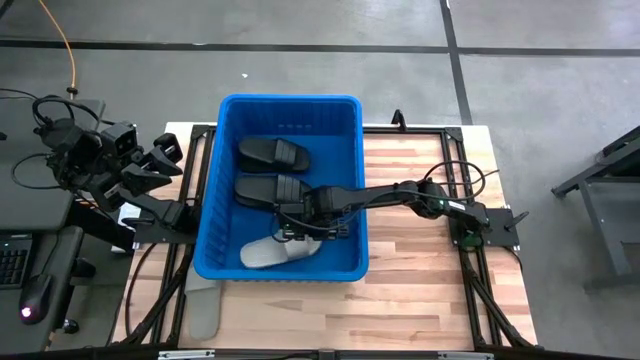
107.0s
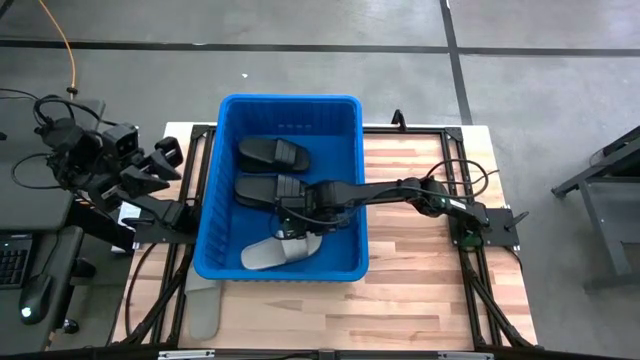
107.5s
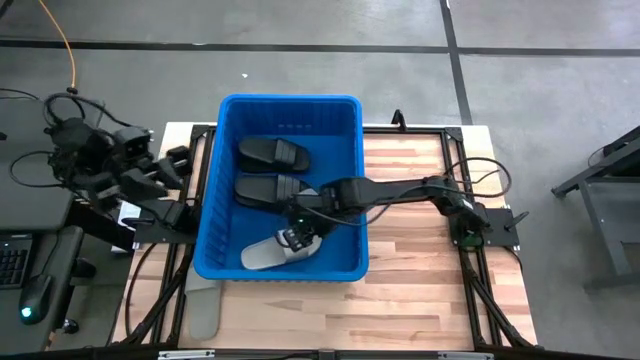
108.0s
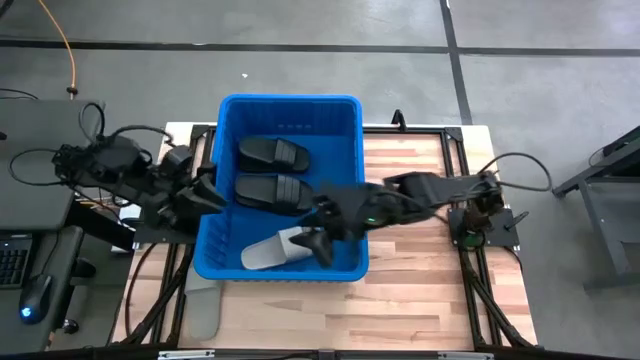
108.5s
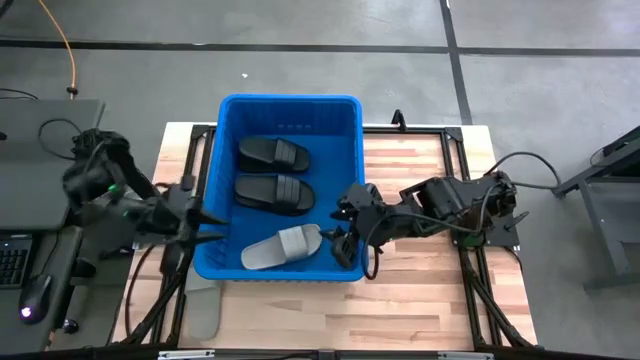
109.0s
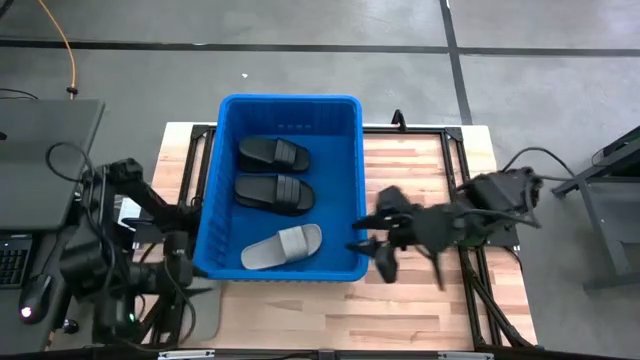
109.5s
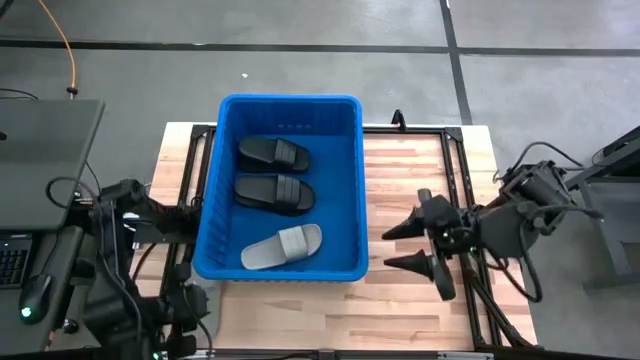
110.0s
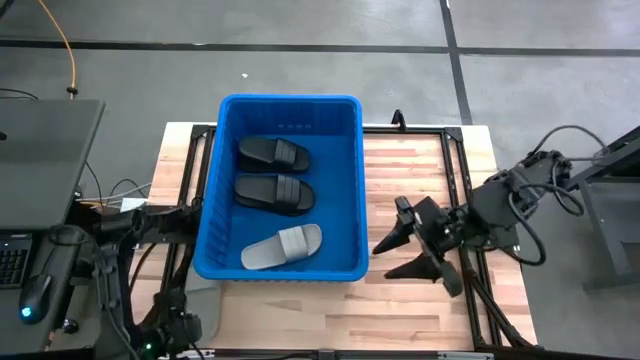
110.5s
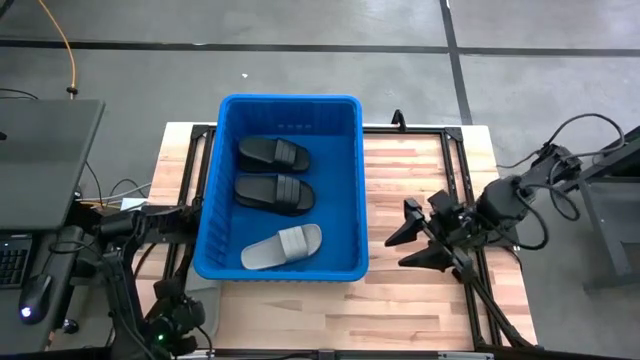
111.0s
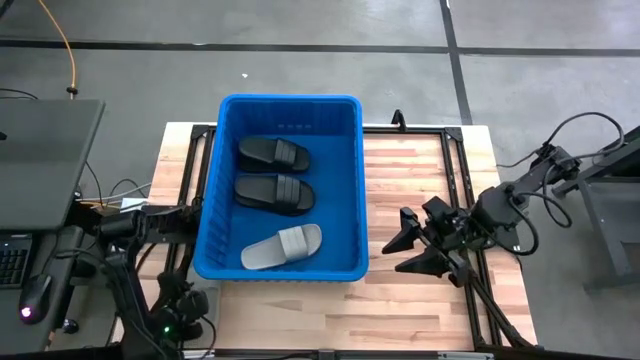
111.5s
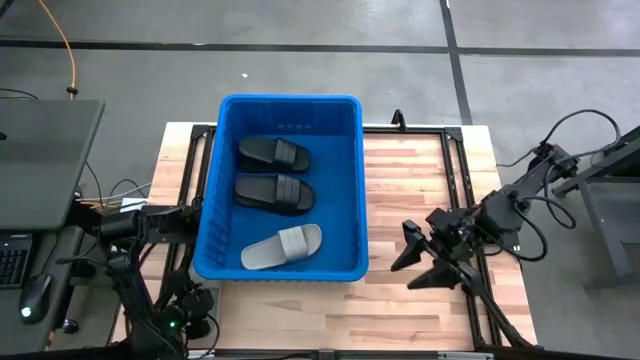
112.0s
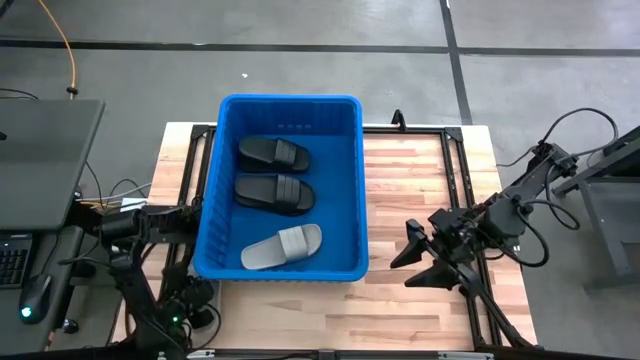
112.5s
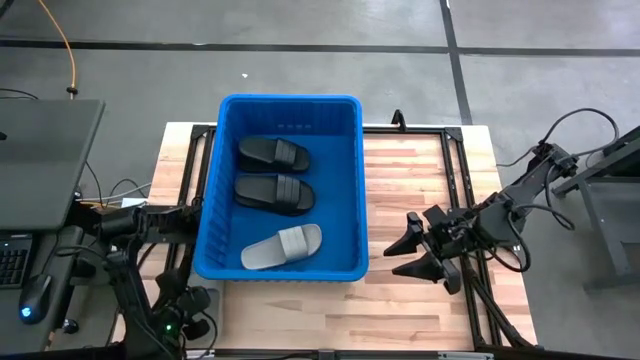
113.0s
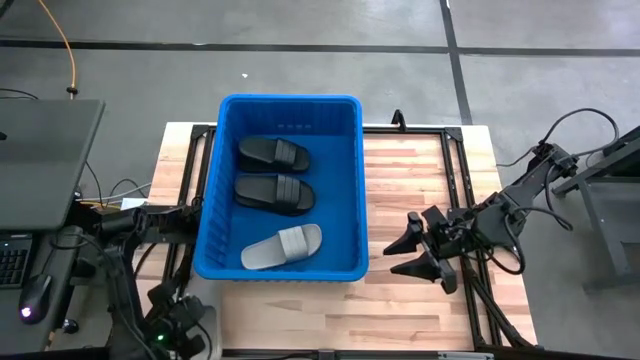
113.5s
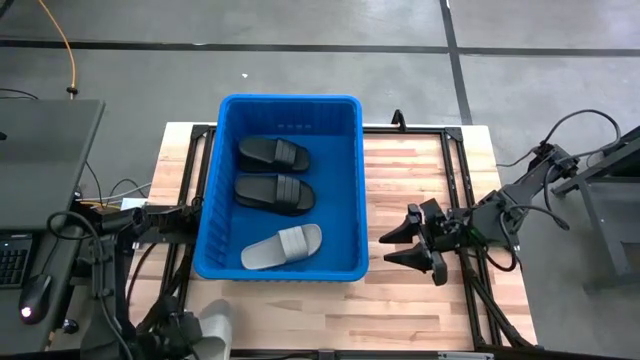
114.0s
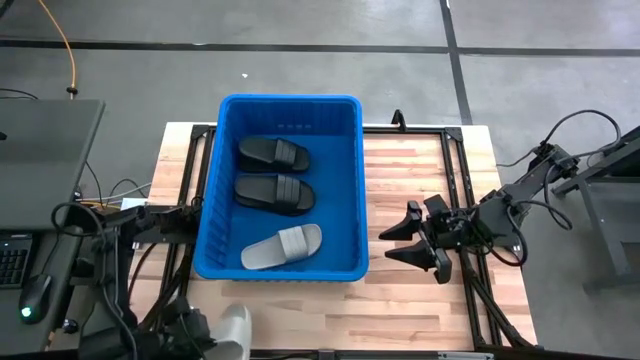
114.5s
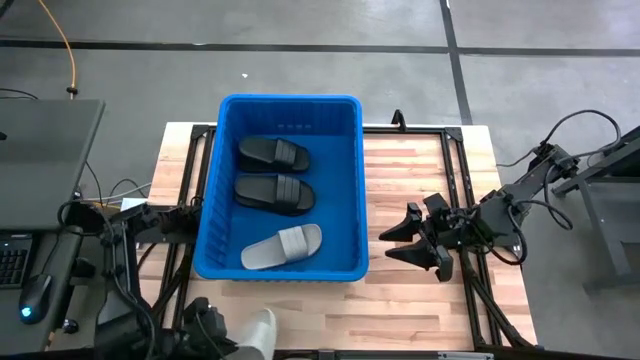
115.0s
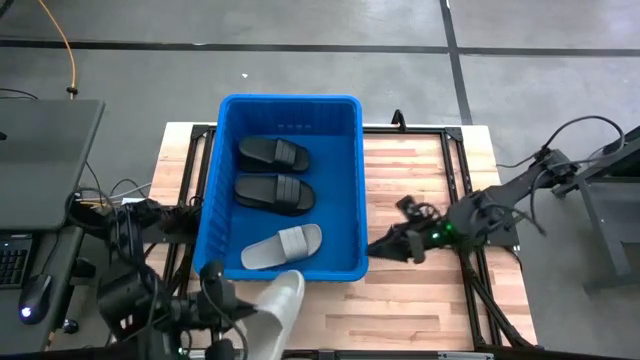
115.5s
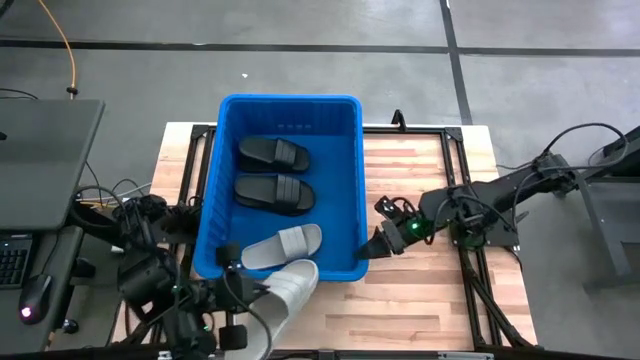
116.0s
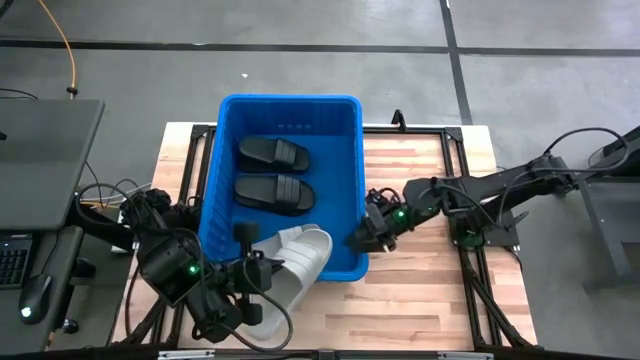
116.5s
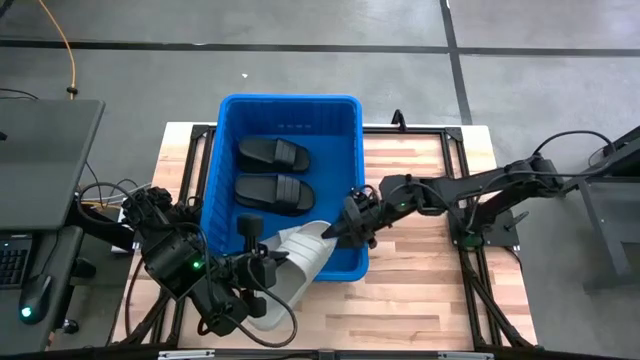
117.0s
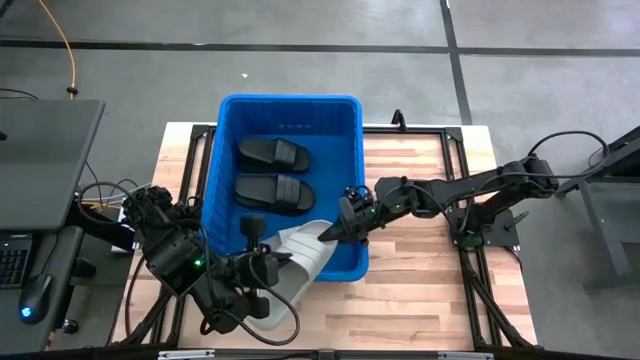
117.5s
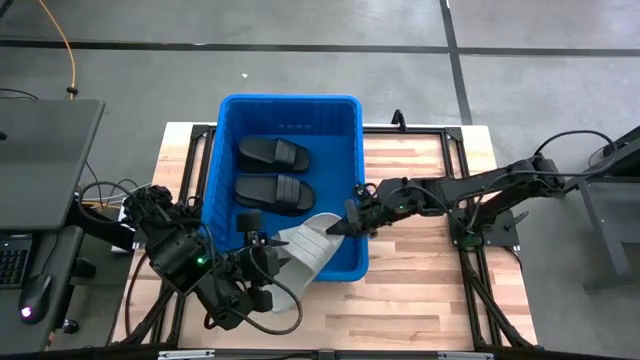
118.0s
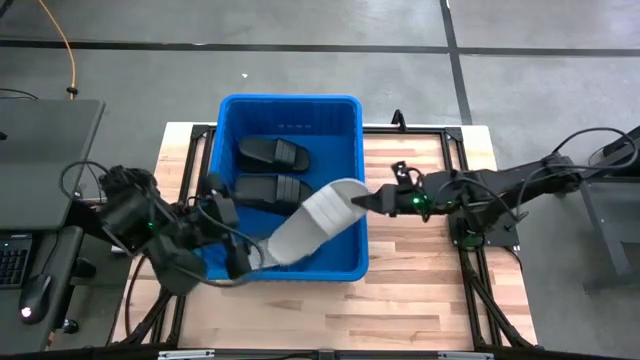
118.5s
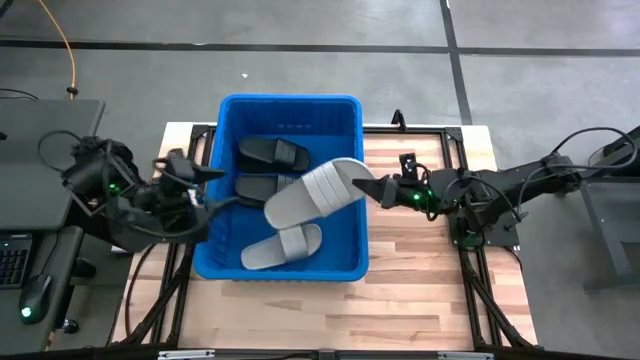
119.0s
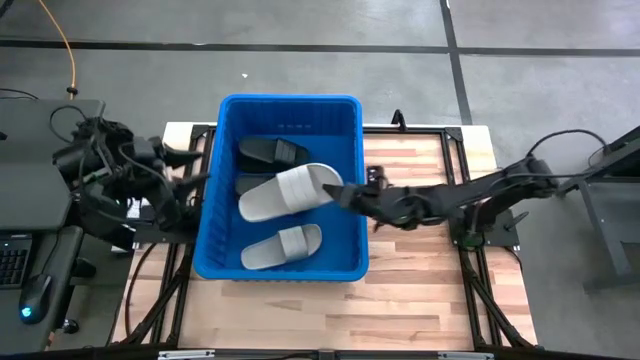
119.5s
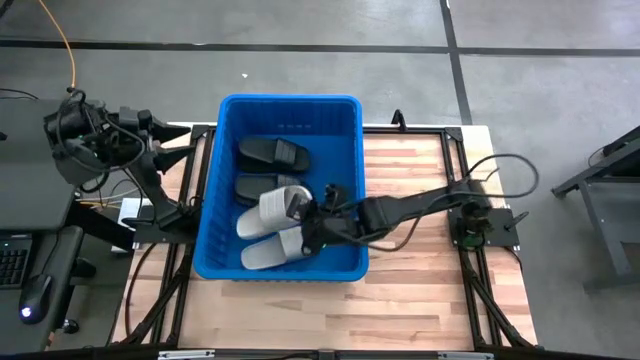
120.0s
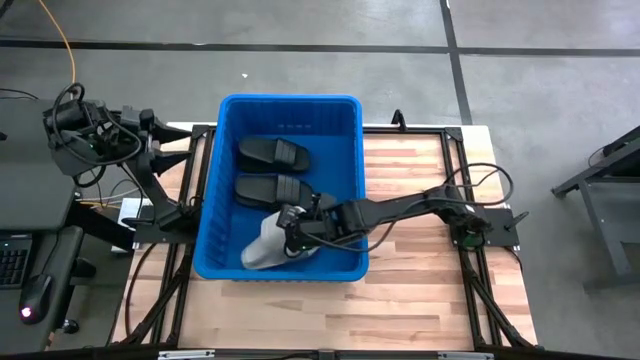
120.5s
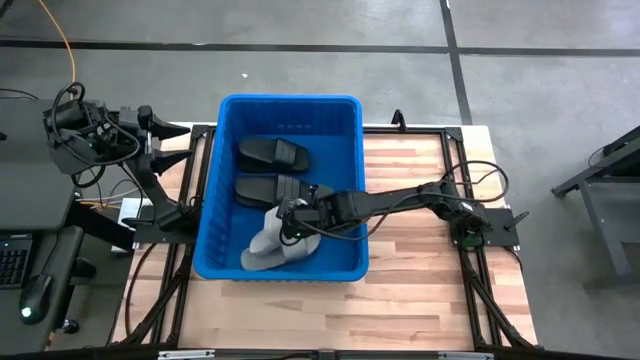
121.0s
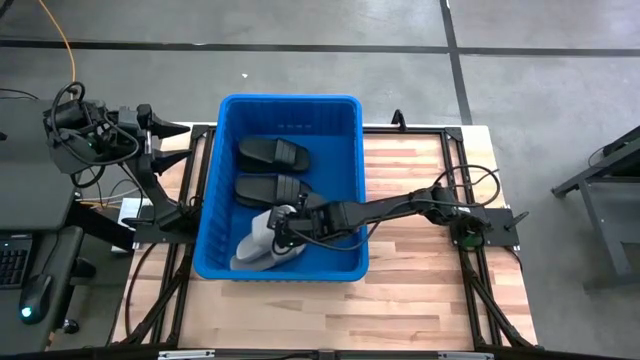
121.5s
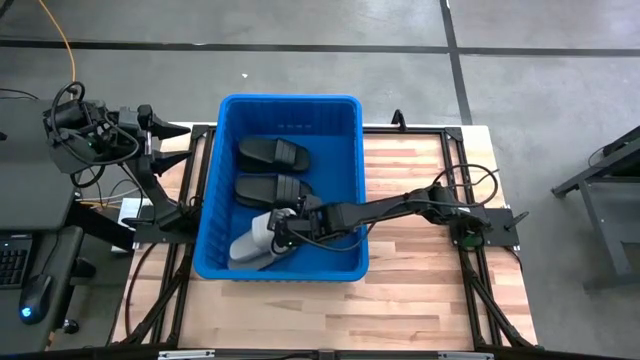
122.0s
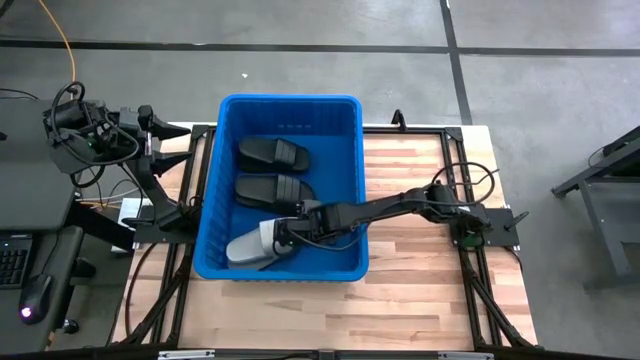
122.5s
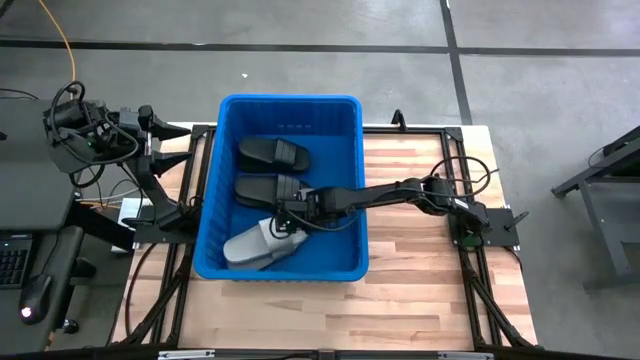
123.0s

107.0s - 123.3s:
Task: Pick and place slides into bin
Put the white slide into the blue container

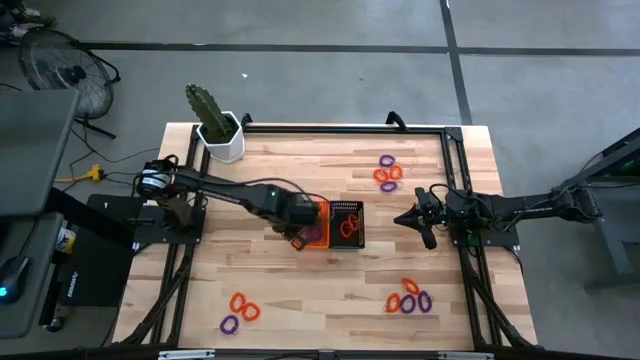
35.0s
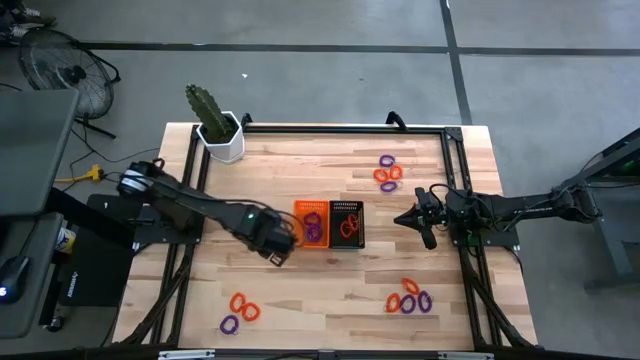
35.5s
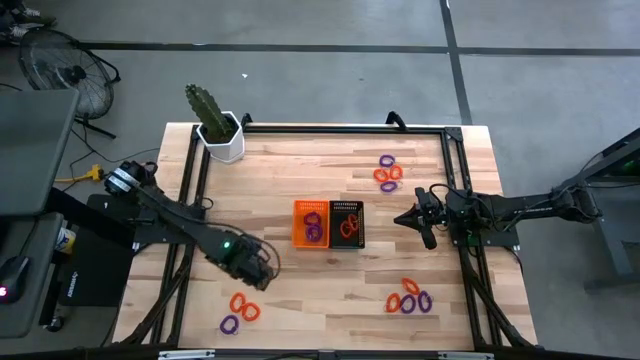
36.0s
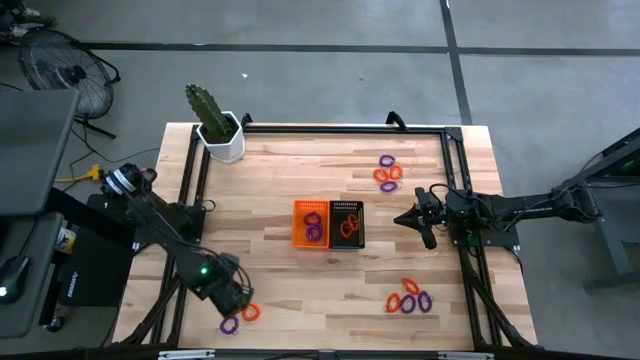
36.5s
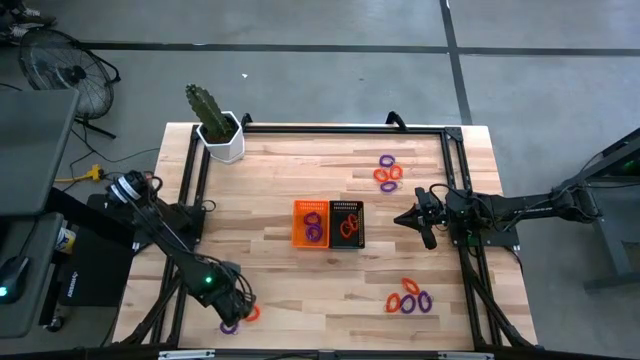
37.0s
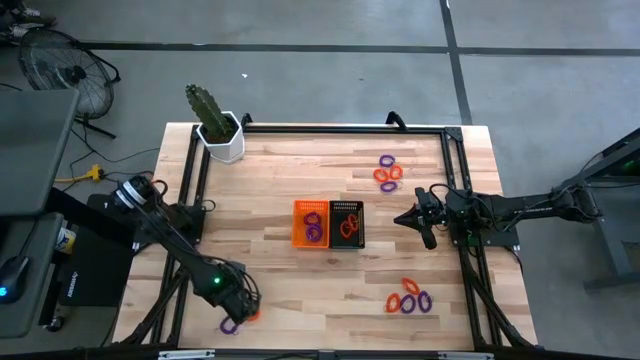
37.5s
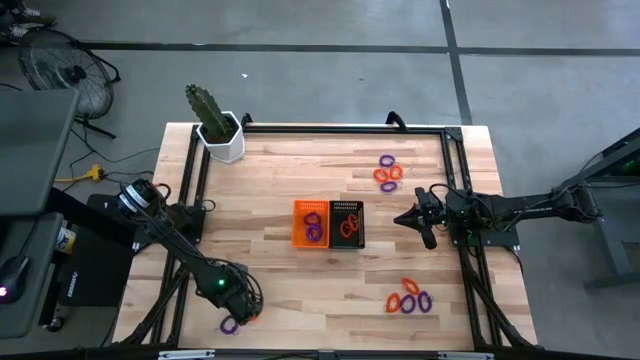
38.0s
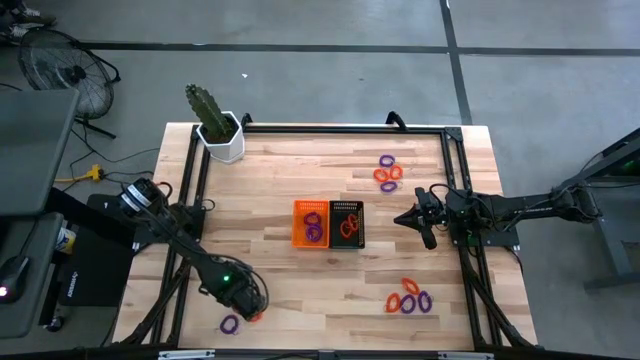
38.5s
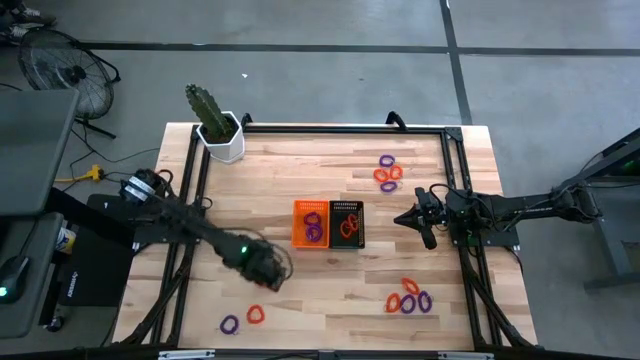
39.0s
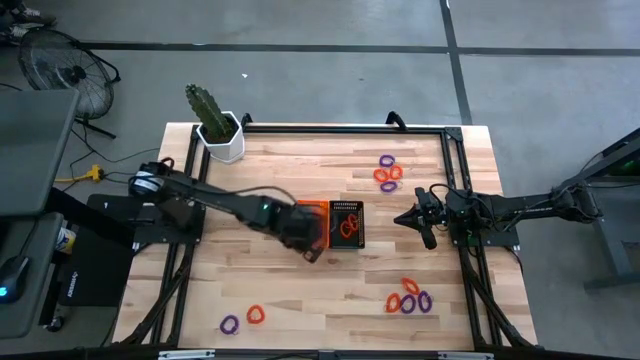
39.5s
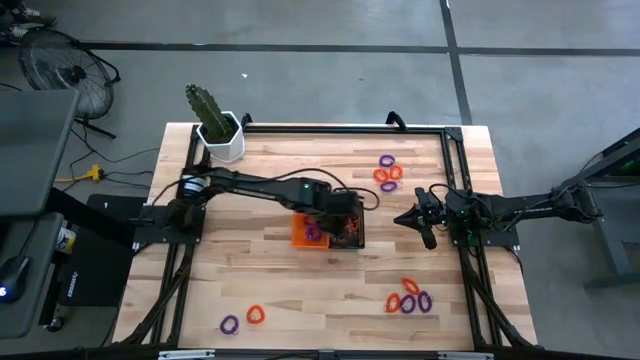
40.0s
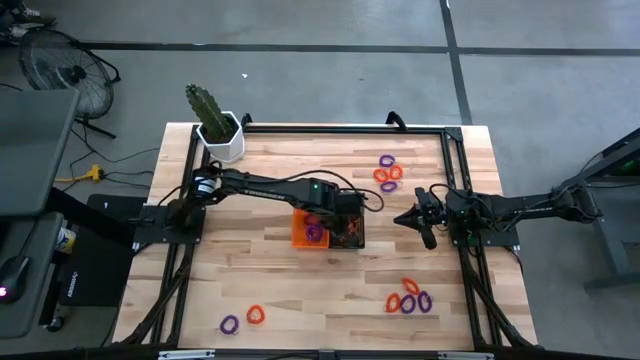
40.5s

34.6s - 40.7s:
Task: Sort spring keychains
Put the orange spring keychain into the black bin
